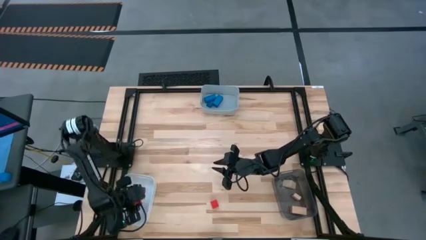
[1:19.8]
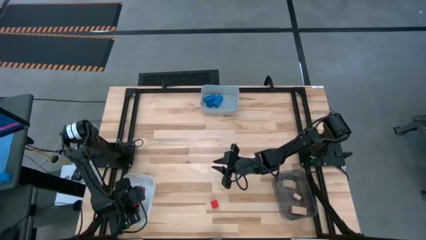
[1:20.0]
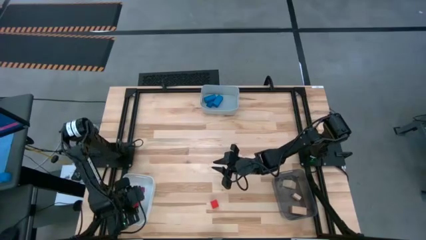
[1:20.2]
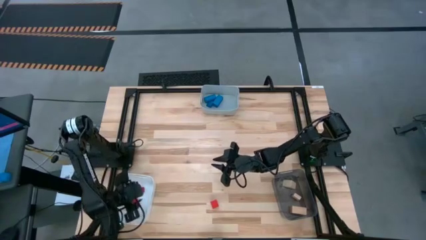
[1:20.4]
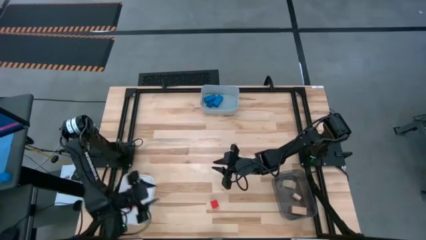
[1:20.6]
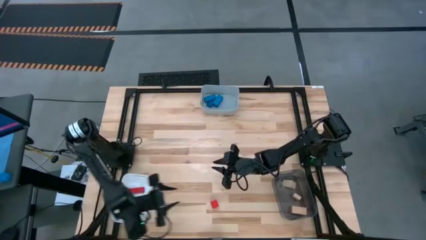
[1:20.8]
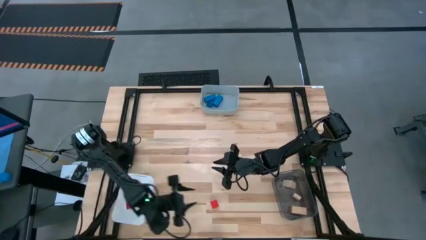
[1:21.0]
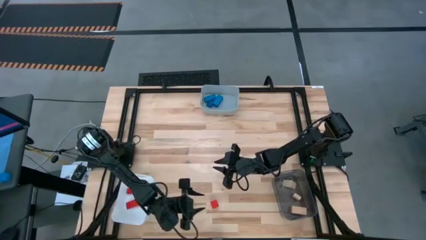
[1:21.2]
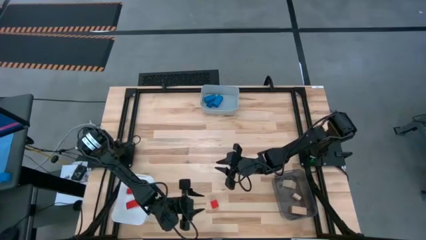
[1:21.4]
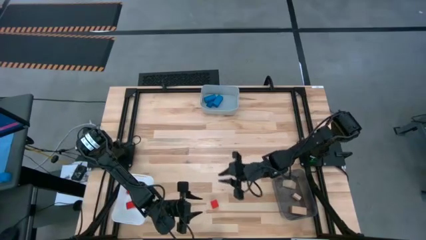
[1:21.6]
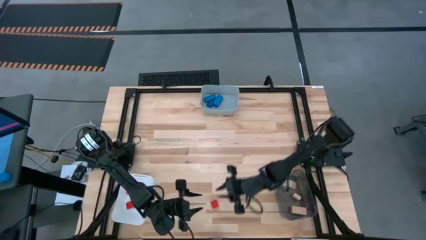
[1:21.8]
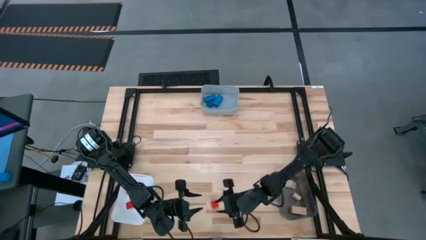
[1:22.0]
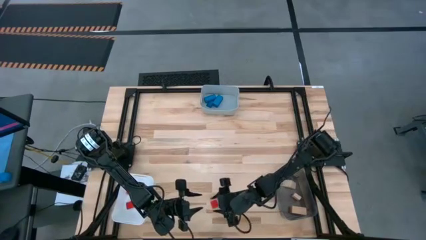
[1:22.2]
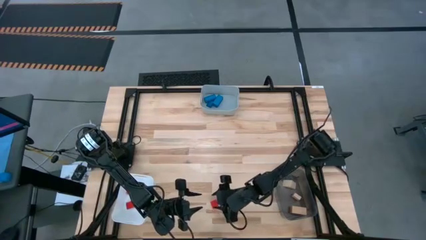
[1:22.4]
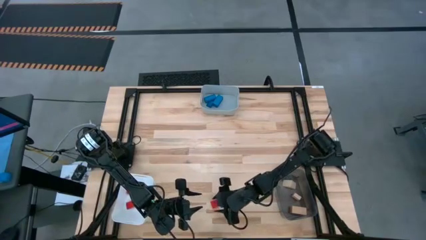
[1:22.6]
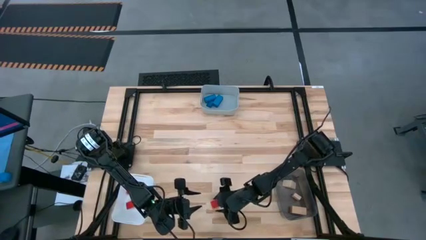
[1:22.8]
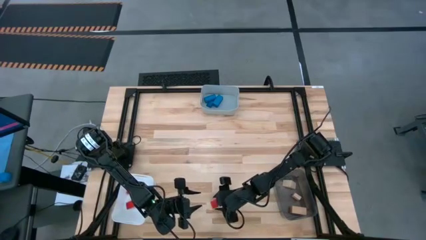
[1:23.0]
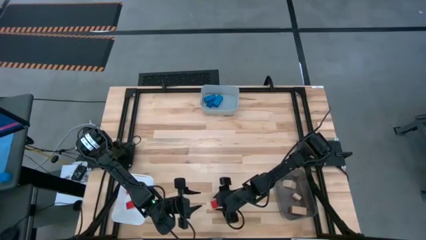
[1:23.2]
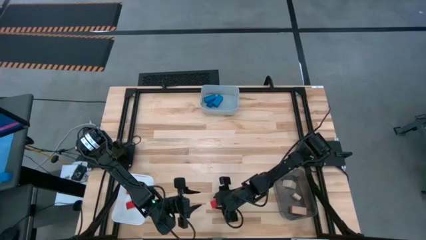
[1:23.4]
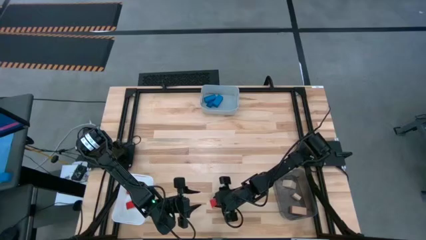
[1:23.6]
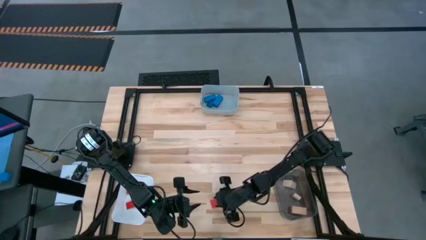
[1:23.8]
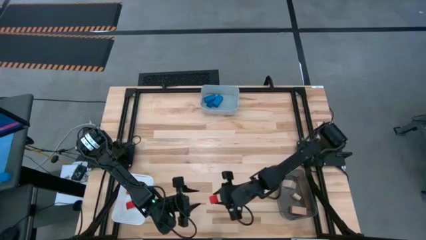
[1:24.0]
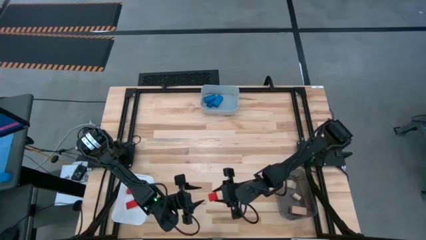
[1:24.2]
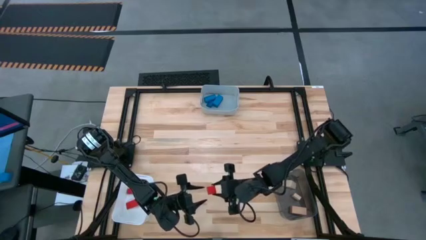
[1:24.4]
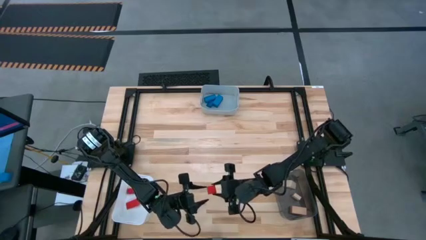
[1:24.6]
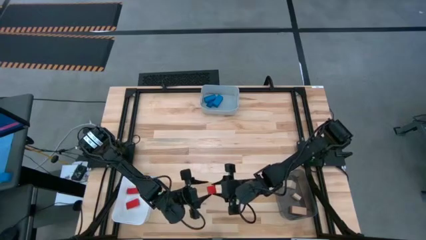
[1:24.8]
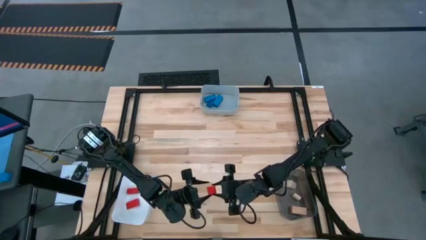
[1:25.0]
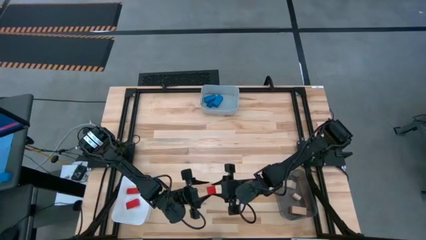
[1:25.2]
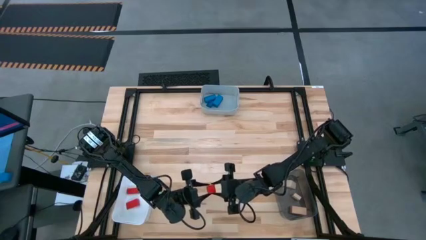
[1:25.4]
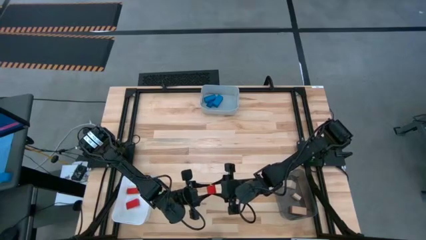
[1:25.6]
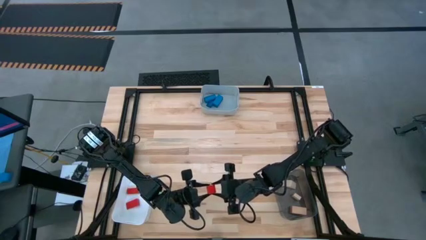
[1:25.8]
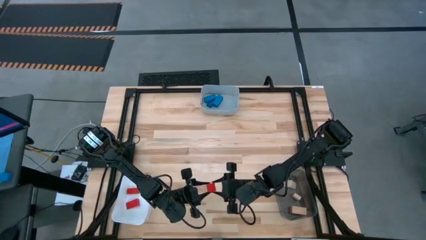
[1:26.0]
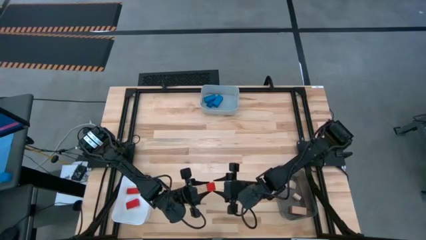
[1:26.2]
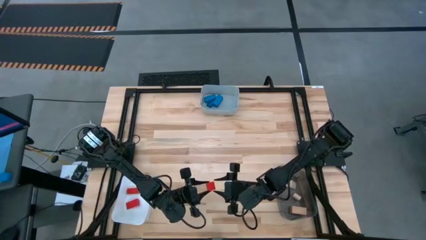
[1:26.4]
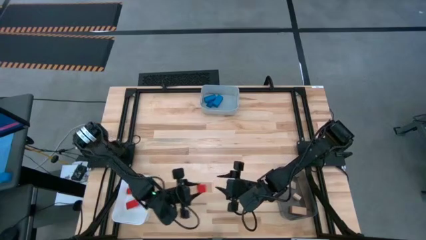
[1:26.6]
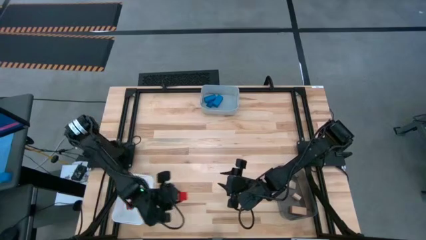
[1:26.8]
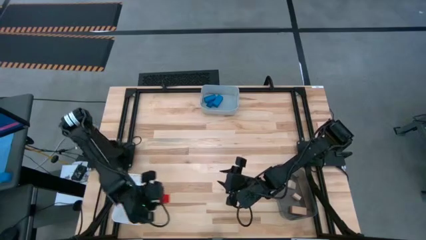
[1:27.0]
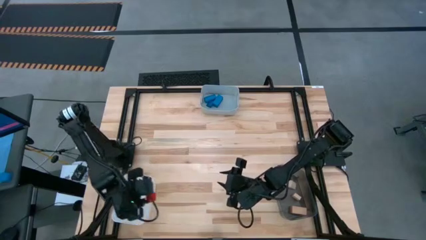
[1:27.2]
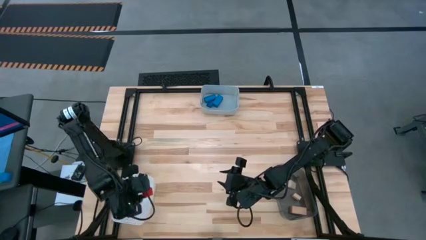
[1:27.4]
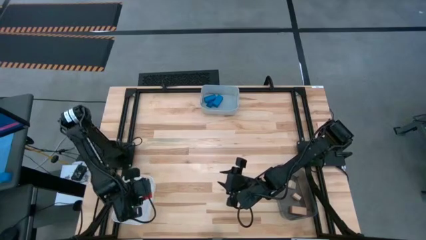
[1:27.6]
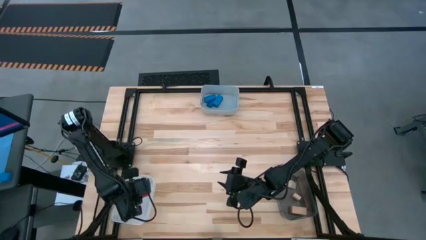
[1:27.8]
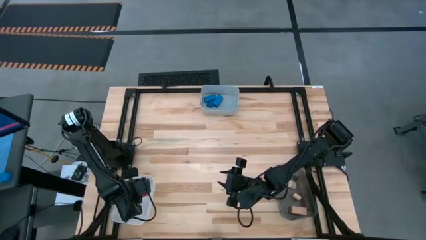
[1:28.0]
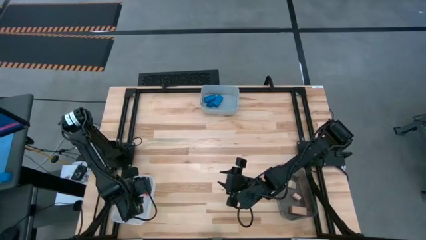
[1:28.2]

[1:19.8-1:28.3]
Task: Sort & place blocks by color
Put the red square block into the white bin
